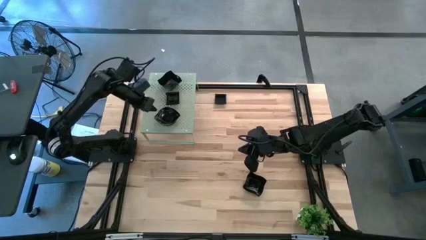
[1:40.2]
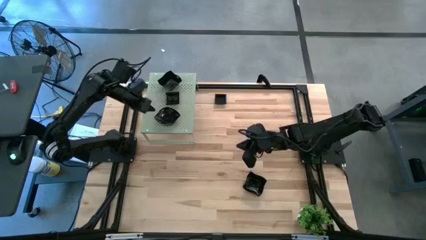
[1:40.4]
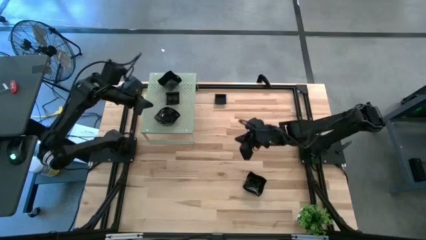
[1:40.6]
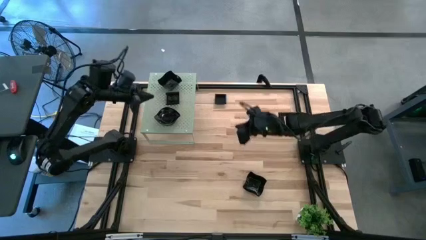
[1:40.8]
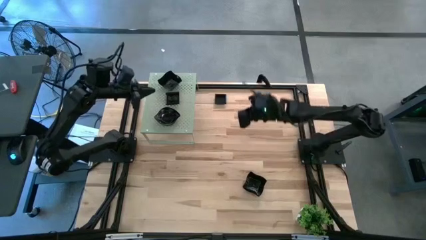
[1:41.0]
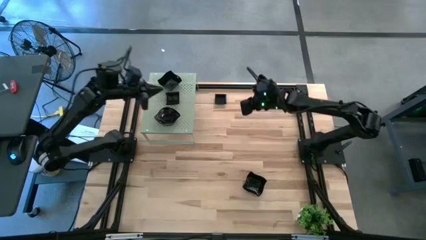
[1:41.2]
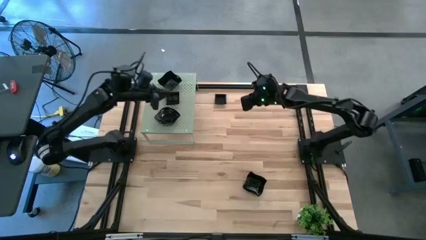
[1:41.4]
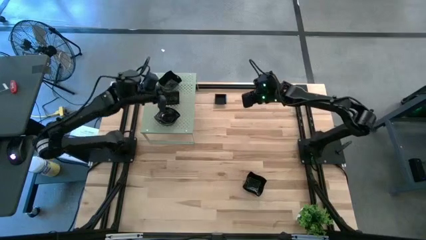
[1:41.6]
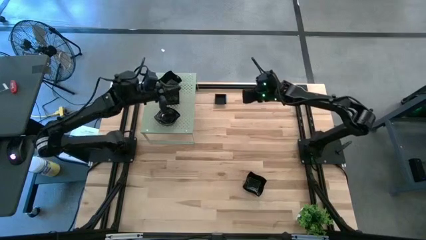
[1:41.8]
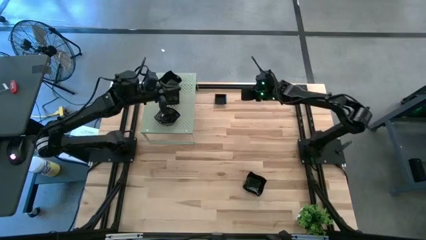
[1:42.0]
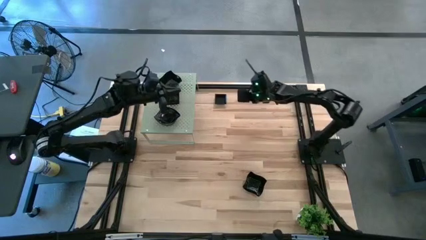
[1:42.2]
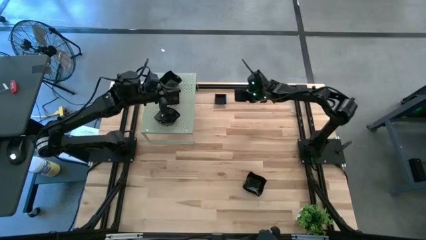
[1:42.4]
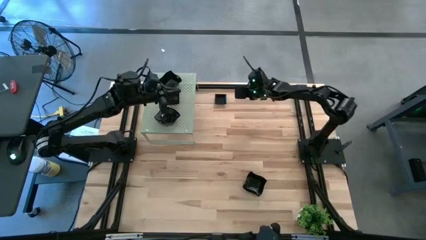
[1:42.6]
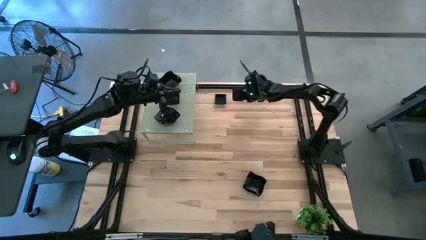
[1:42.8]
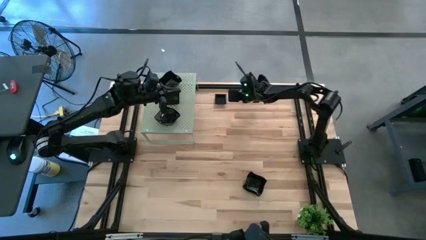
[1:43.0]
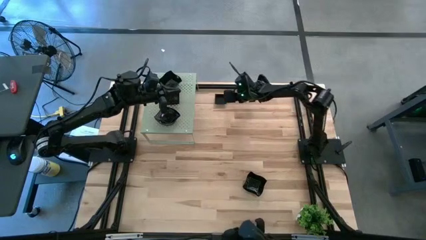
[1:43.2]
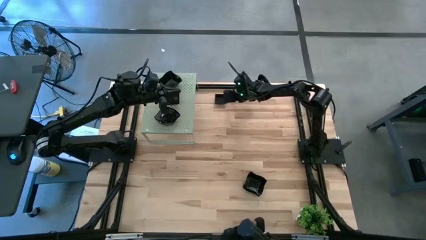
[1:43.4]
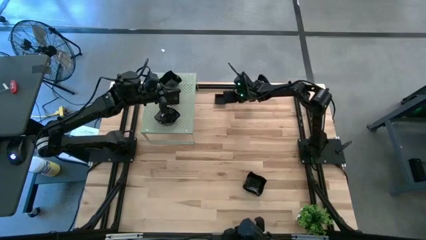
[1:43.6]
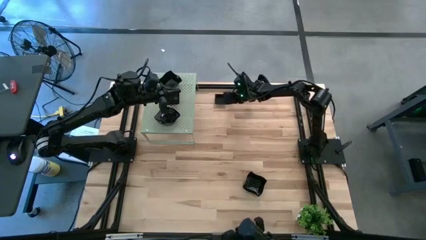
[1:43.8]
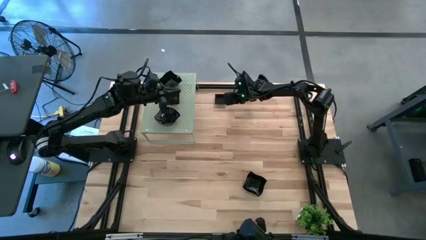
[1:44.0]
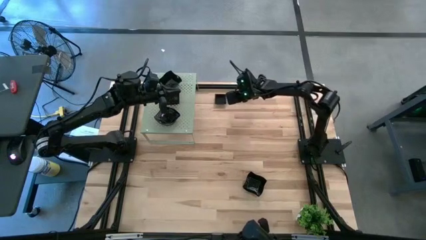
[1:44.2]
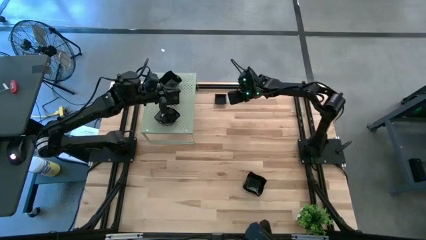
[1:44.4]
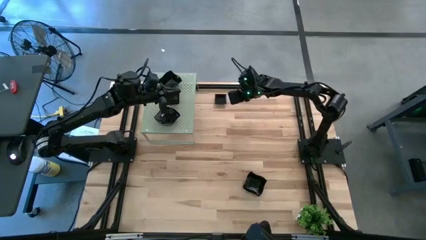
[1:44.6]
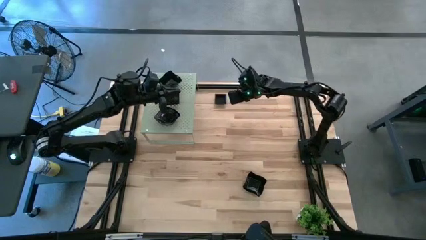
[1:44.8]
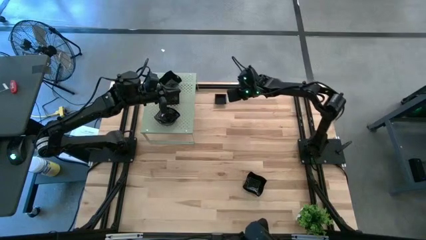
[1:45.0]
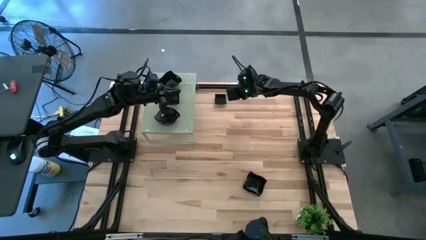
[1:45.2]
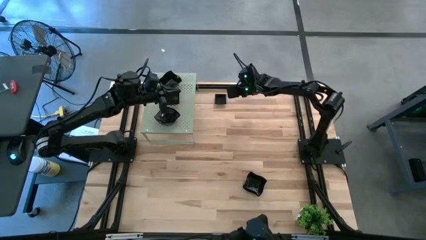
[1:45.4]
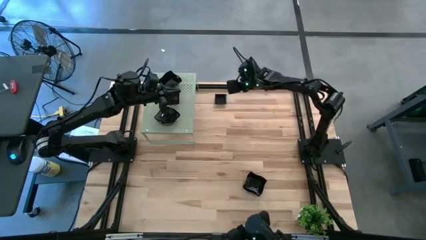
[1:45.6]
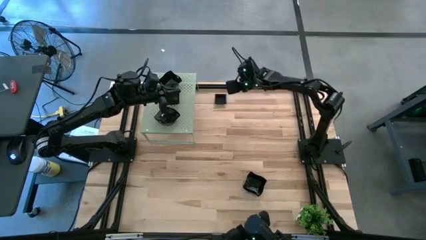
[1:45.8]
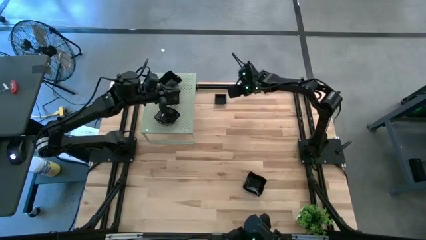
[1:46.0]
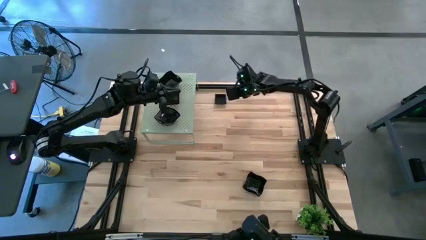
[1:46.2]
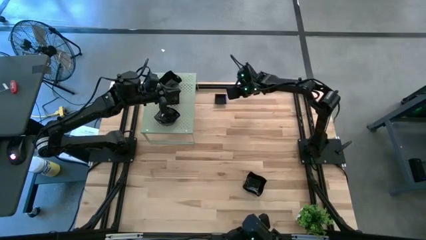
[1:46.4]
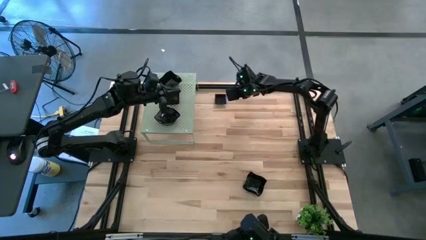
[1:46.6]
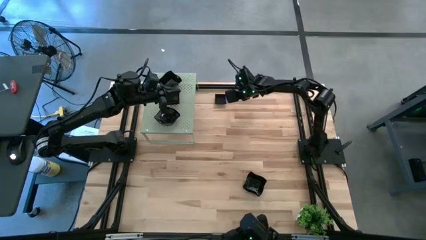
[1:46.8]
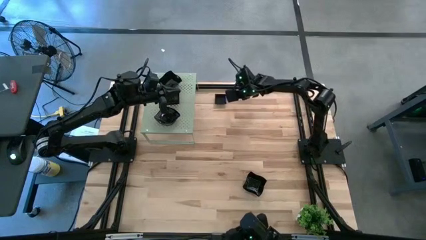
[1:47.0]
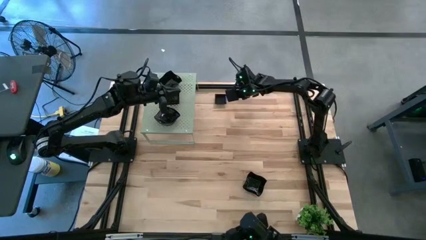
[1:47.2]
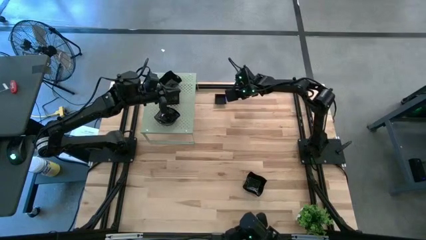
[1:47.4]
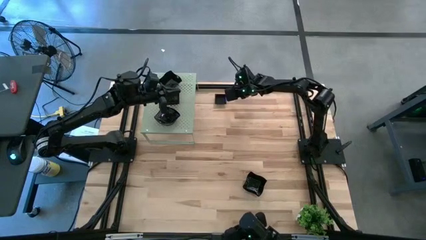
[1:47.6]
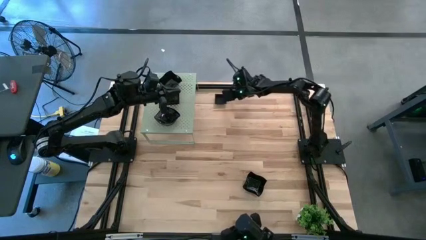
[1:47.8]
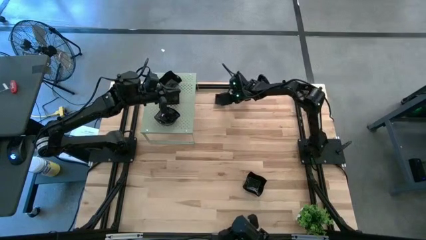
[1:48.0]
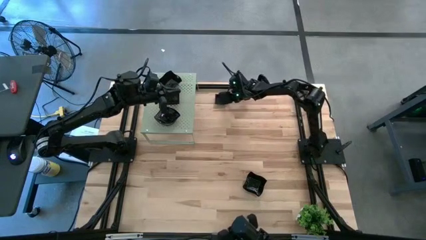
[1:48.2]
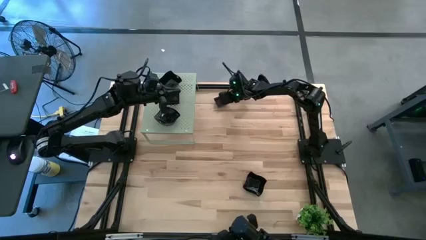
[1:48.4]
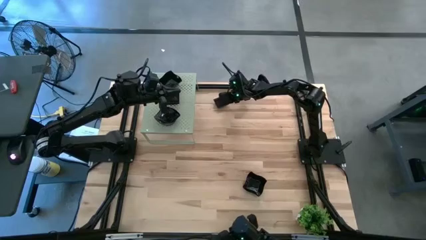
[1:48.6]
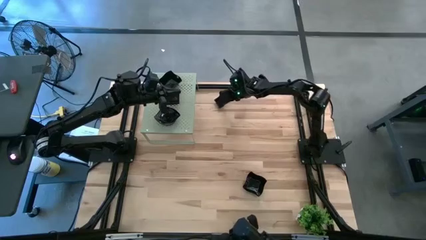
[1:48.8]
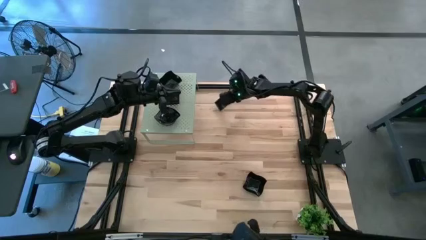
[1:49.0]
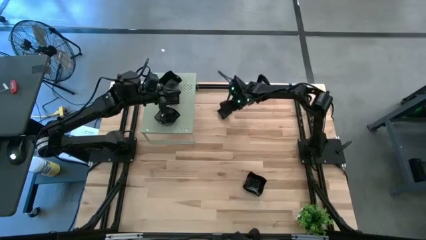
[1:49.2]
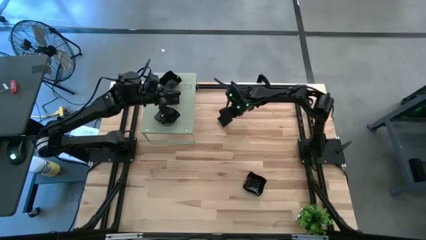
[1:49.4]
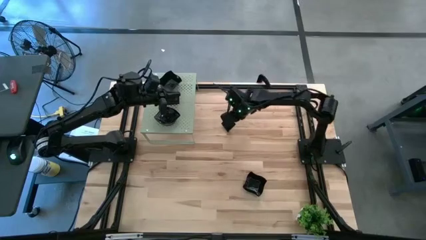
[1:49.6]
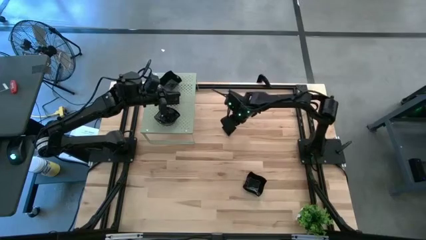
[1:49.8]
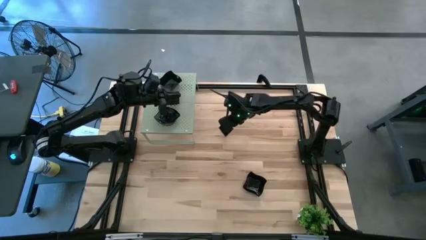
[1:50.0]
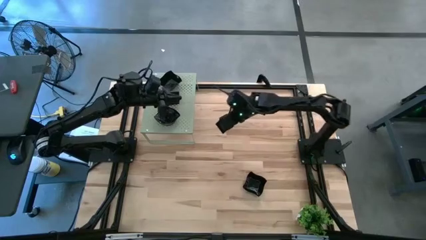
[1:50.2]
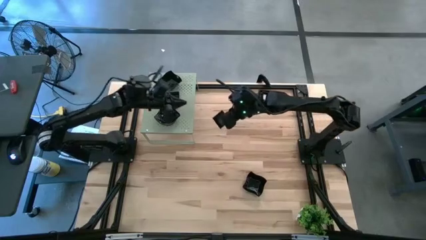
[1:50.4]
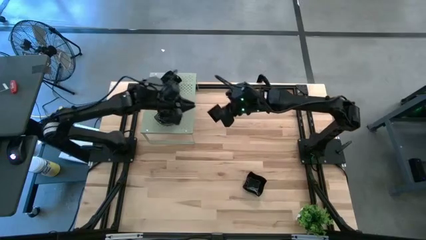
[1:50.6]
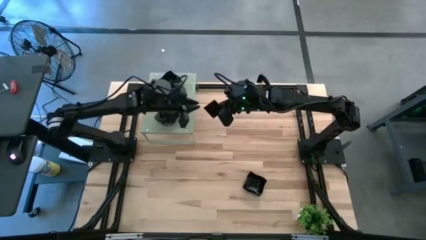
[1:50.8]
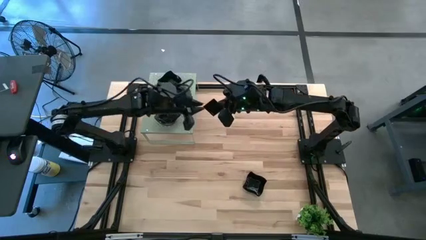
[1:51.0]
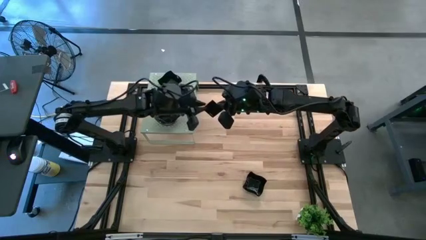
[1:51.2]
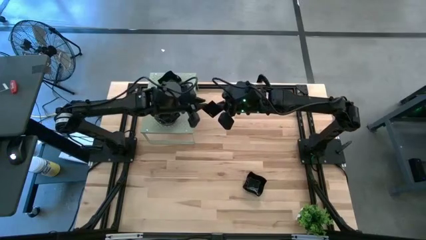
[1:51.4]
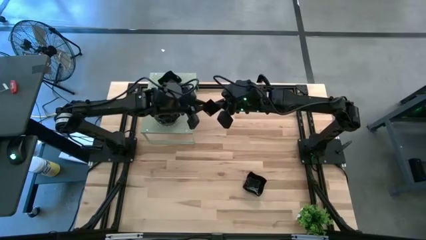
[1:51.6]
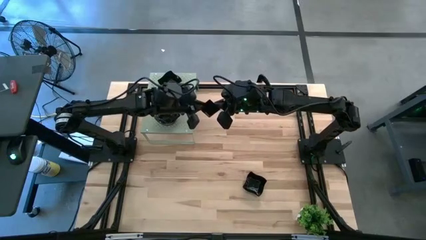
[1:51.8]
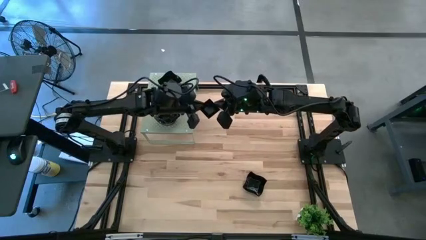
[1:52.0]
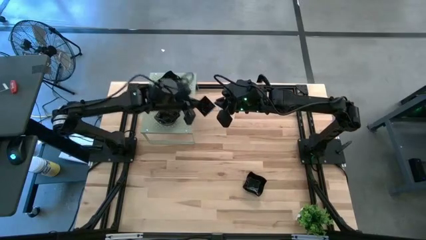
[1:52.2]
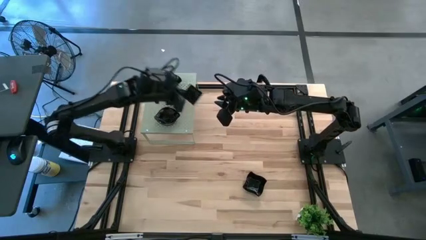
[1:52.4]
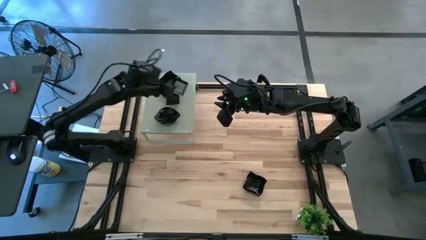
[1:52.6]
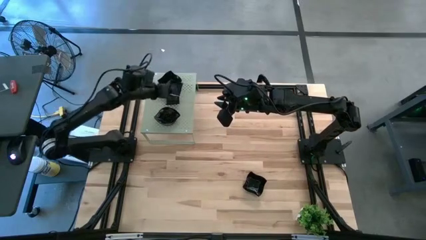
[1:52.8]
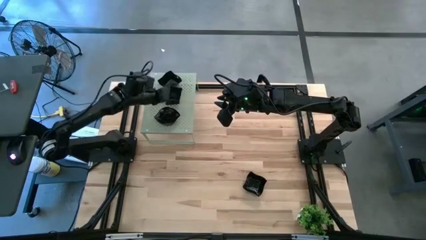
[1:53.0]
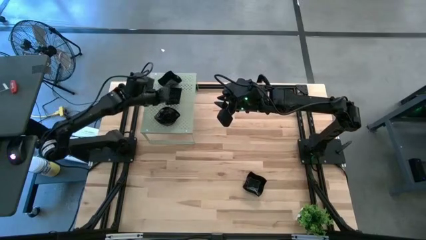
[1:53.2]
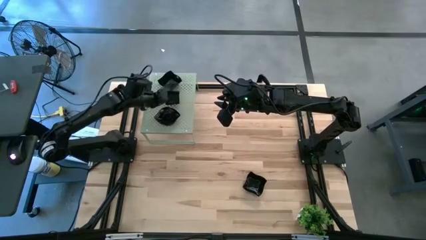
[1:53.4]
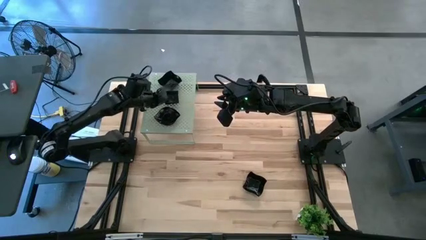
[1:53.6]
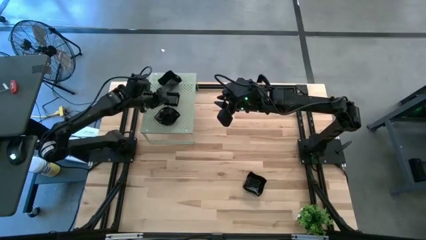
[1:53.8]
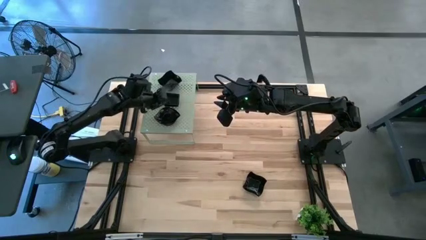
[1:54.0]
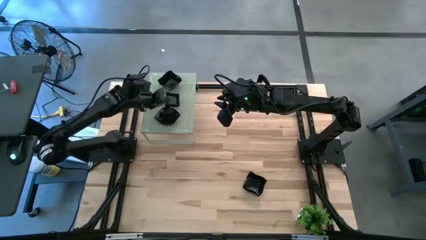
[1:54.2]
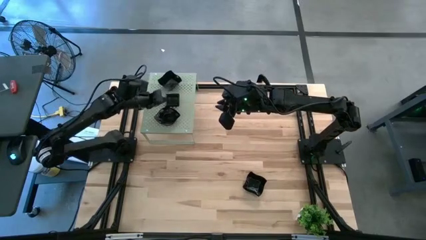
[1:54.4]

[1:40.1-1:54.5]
Task: Pick & Place Mini shaped plates
Stack the square plate on the other square plate on the shelf
